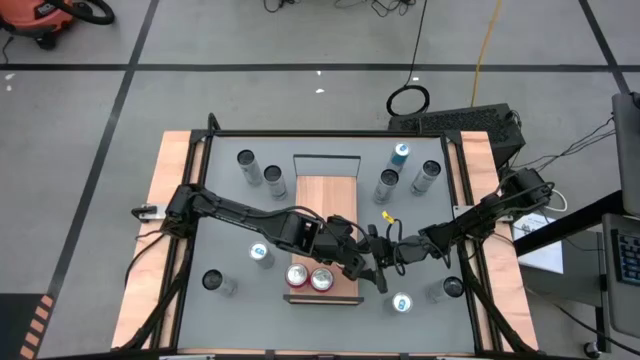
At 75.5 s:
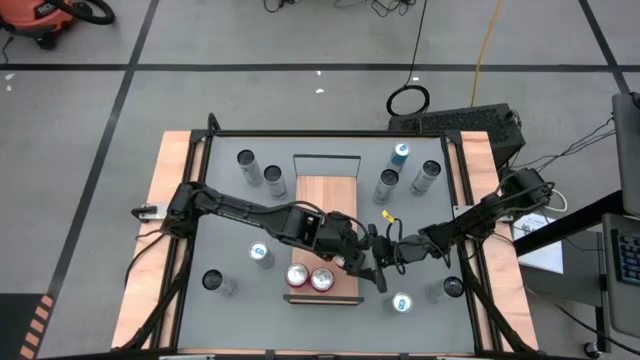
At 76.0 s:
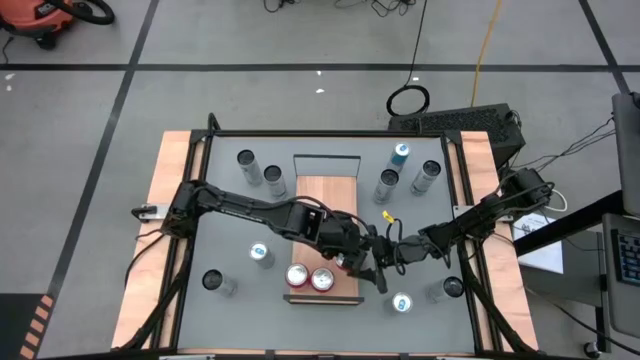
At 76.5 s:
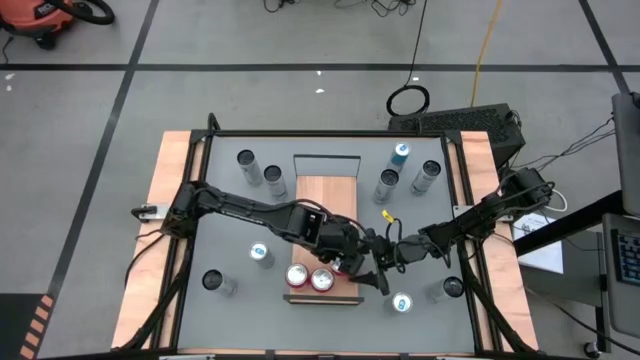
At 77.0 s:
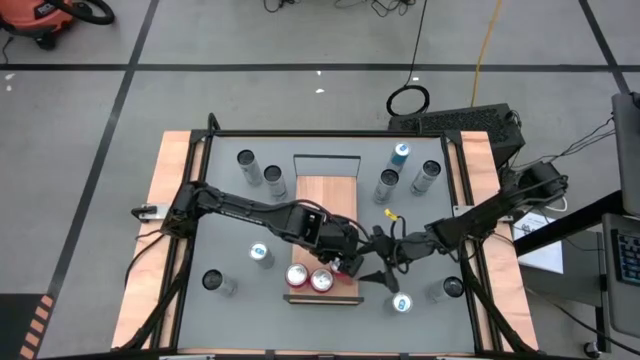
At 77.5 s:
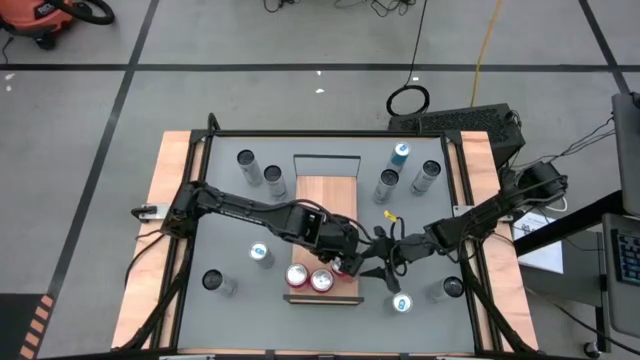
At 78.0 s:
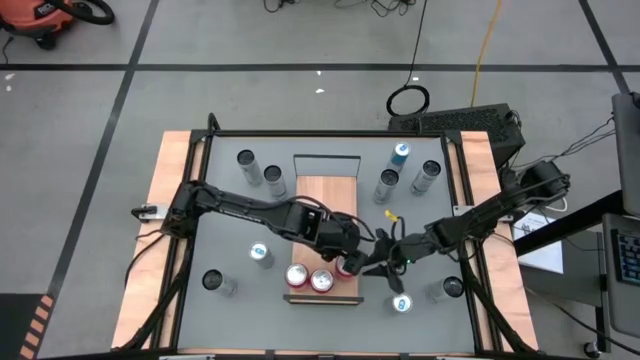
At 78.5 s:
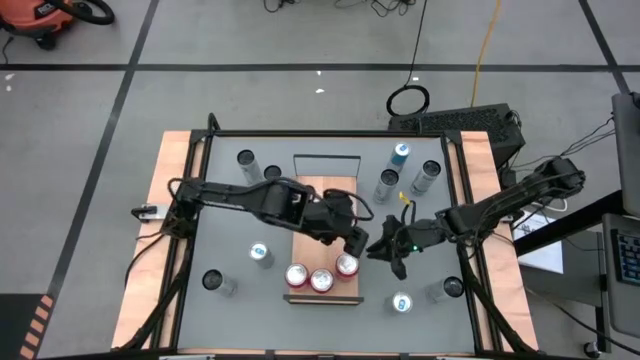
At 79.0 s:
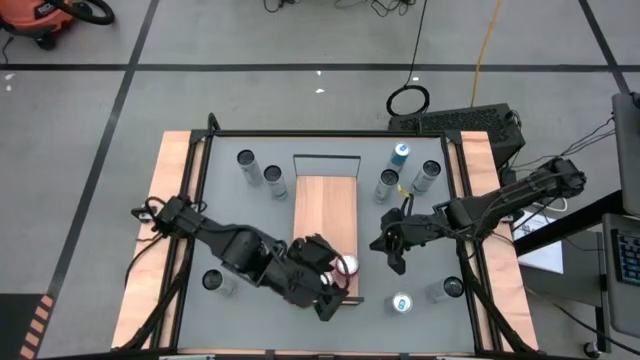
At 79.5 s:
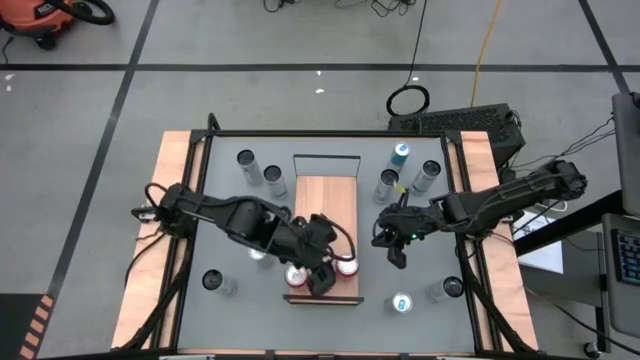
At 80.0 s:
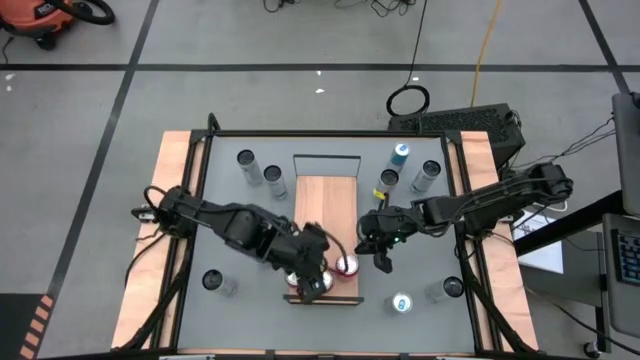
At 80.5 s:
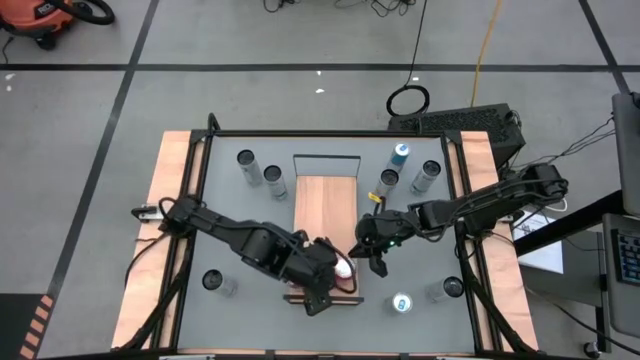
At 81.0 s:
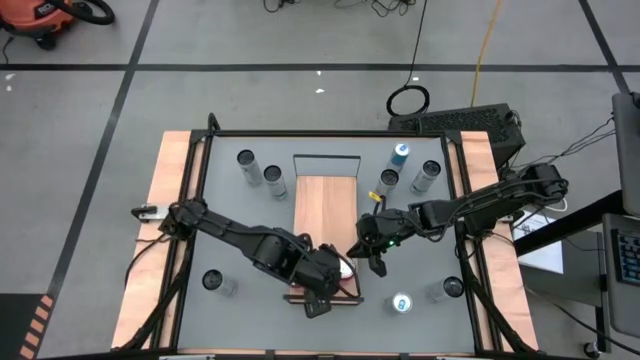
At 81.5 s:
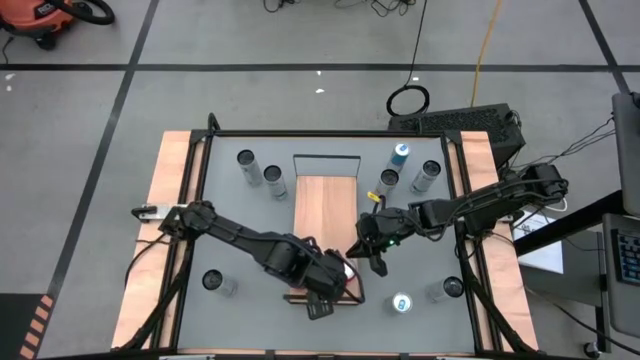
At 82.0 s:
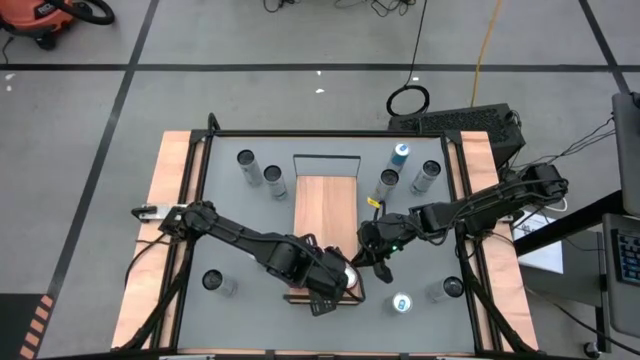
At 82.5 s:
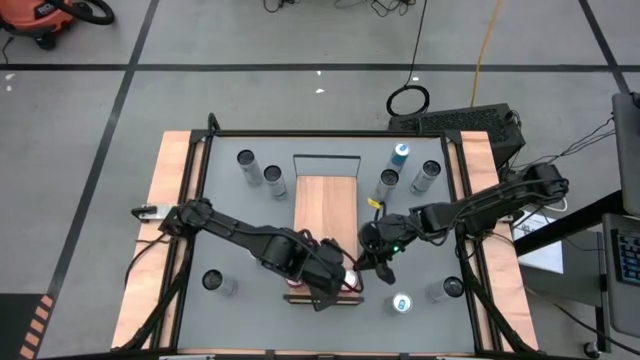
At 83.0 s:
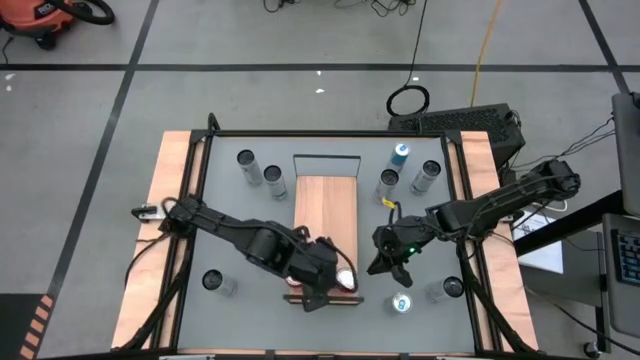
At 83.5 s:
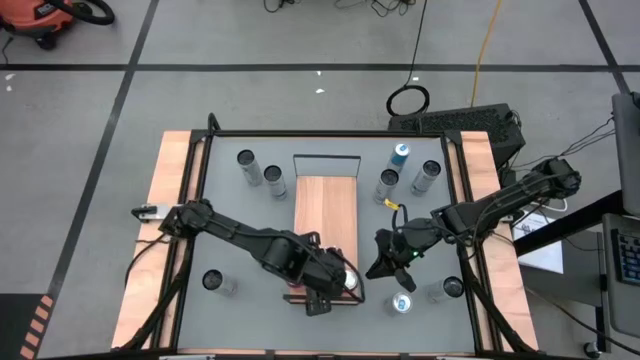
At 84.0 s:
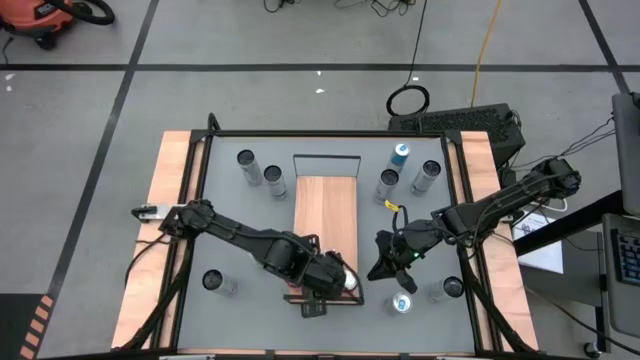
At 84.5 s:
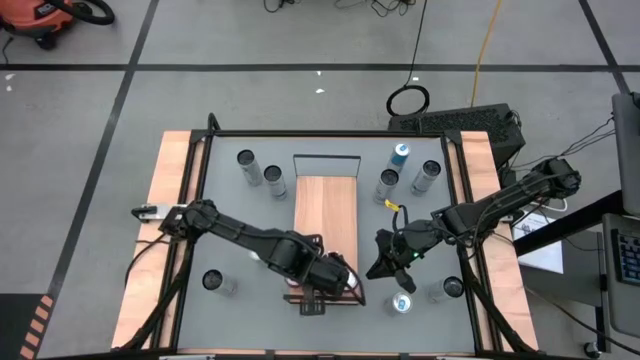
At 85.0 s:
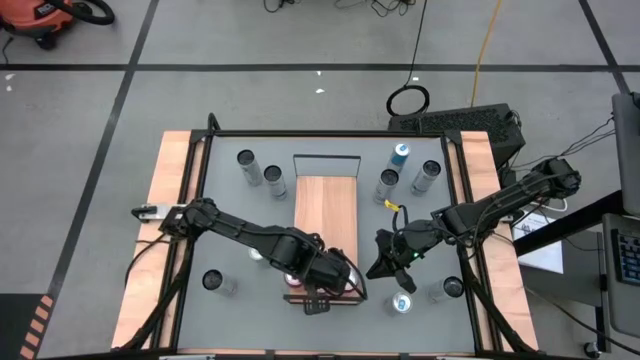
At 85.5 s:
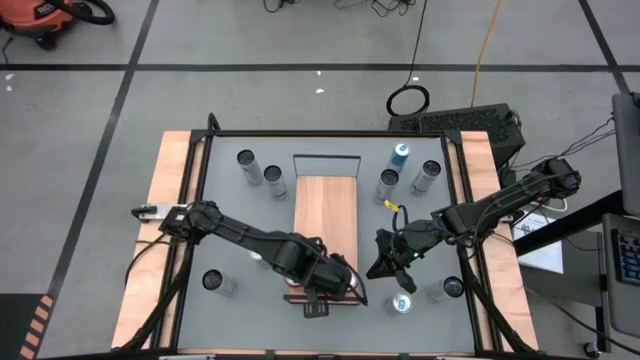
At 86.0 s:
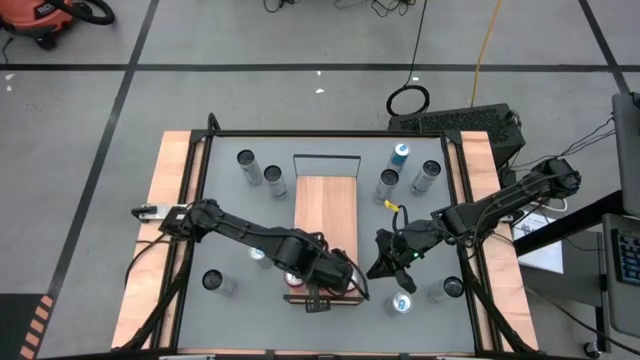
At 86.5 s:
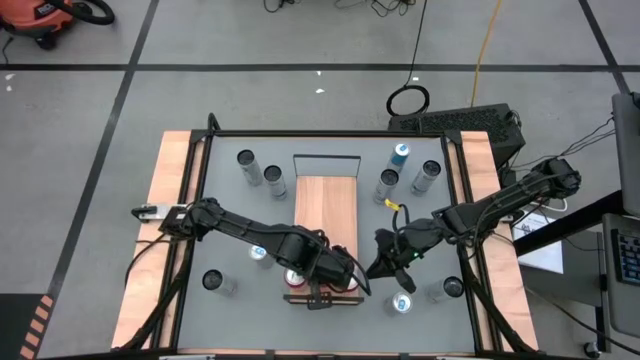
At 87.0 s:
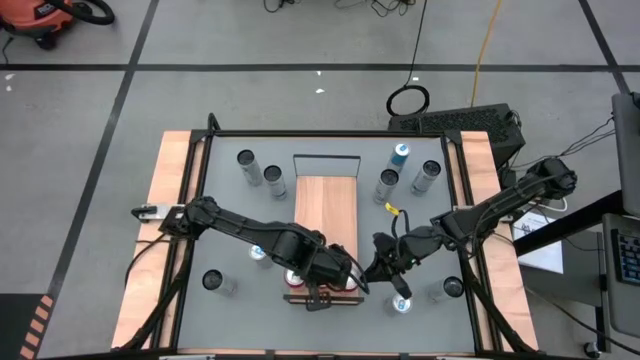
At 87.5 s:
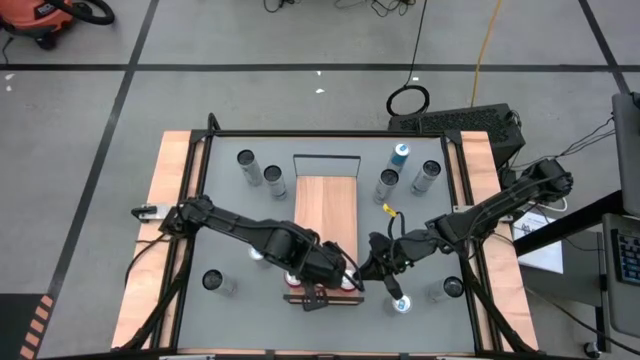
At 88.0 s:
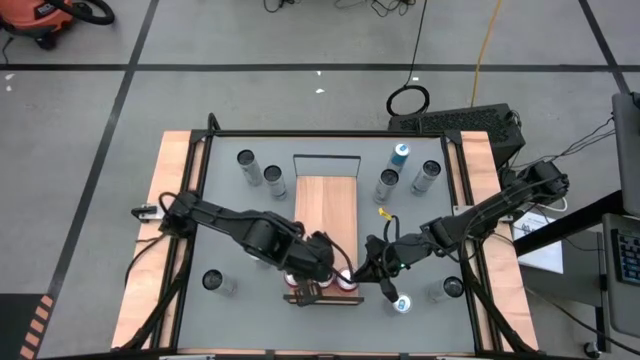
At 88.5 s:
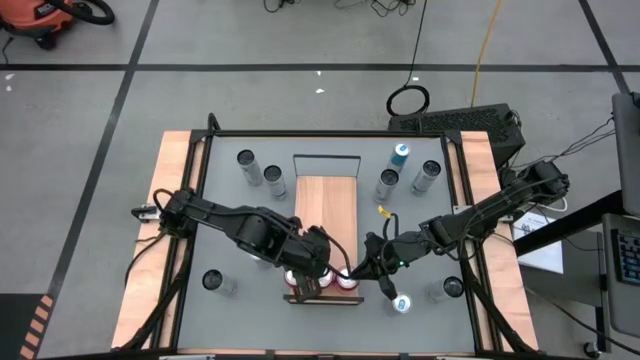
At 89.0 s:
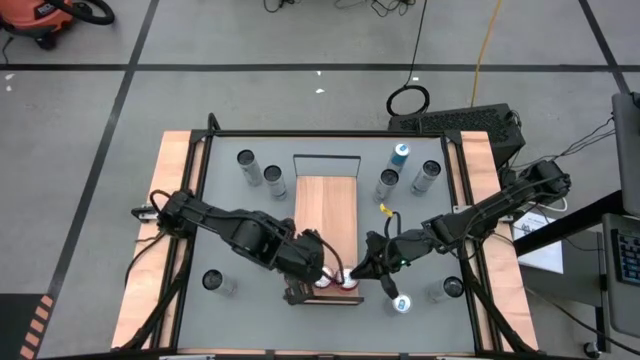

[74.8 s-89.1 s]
Task: Sort soda cans
Put the red soda can on the shelf and align it with the other red soda cans
